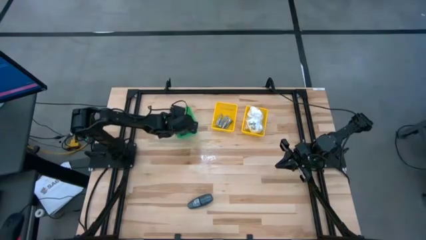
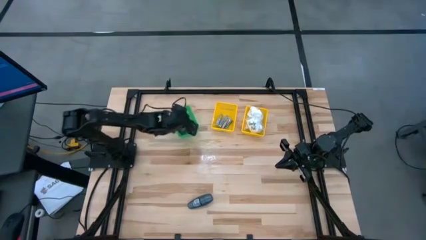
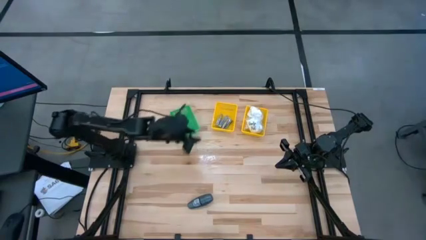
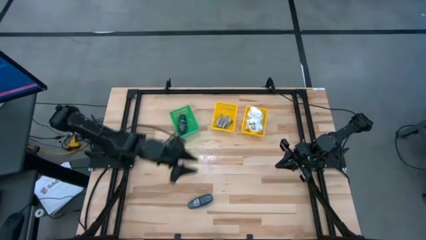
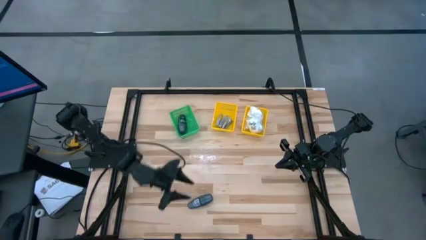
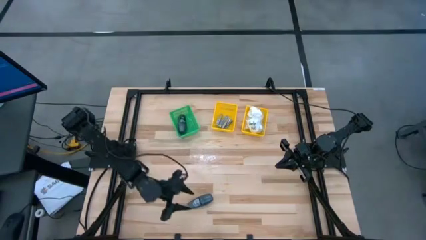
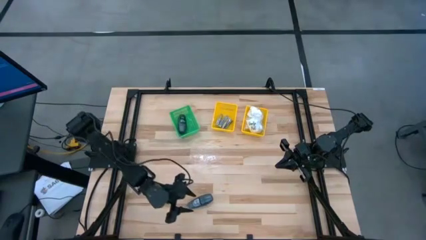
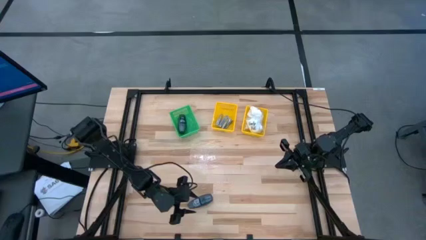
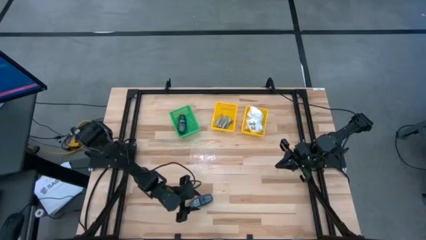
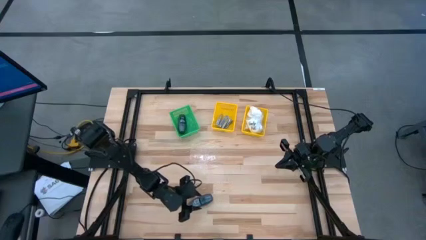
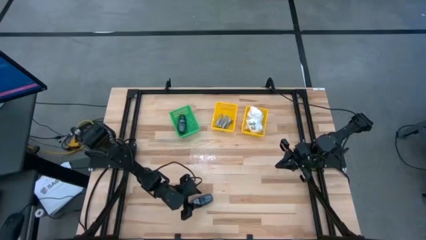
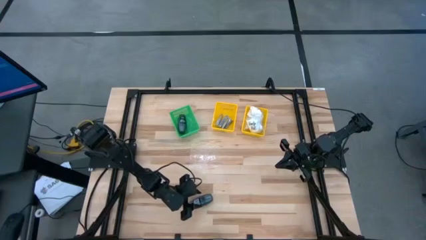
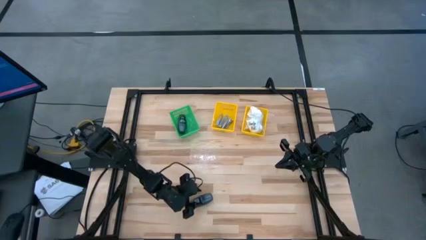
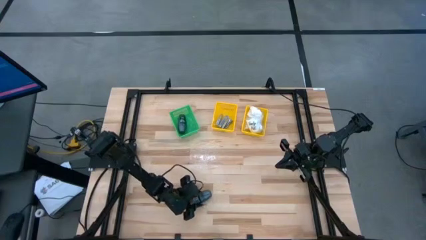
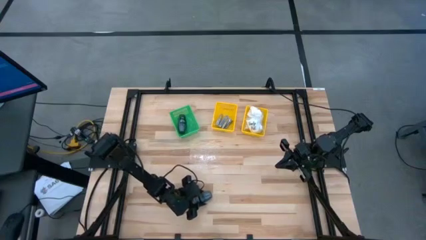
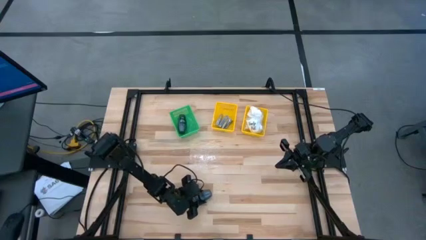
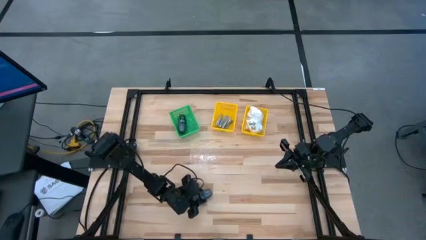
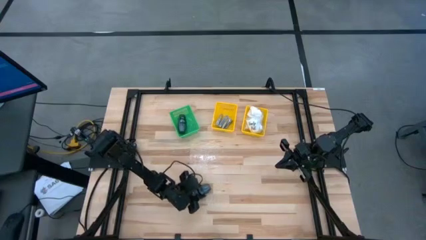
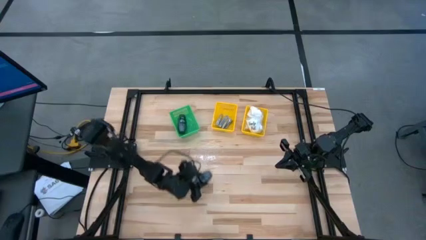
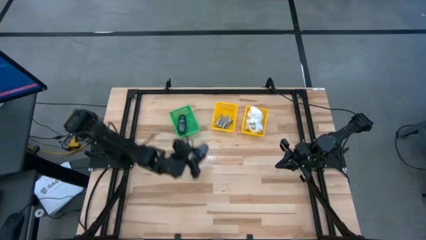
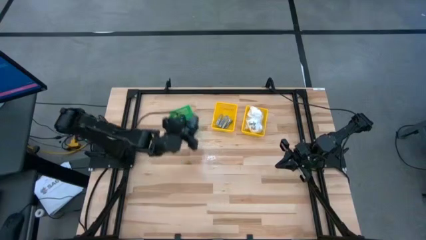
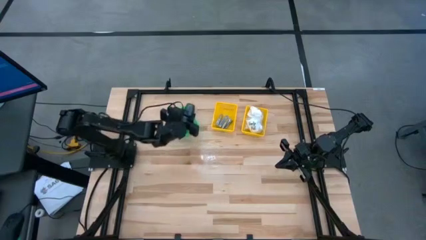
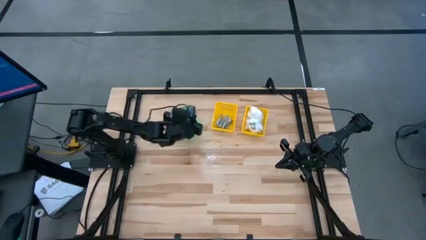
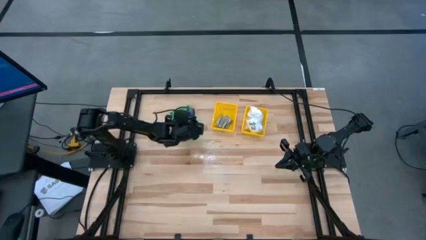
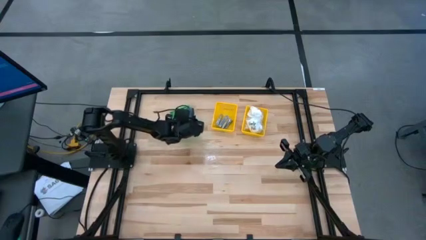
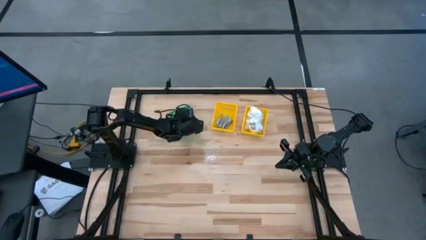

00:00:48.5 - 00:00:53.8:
Task: Pick & Place Travel size toiletries
Put the black deodorant into the green bin

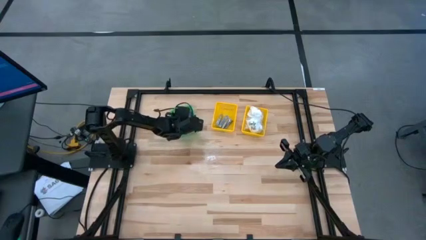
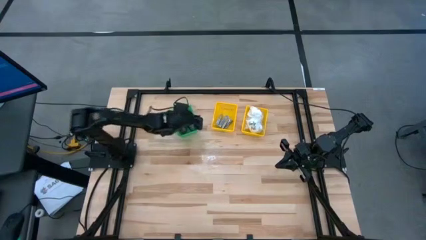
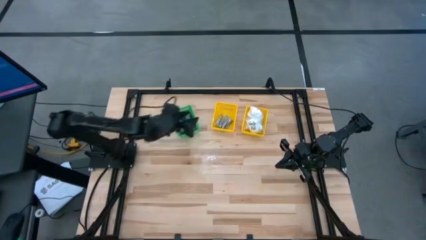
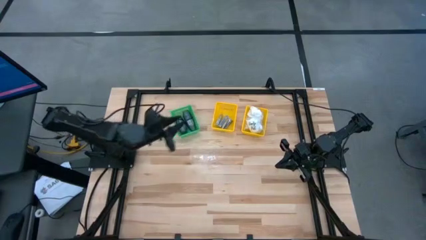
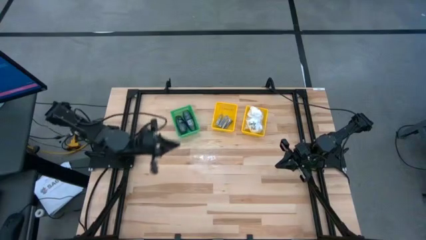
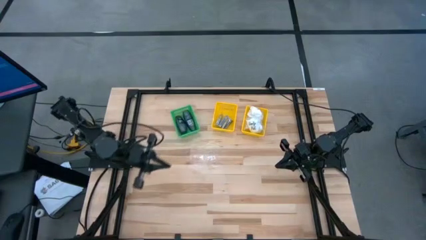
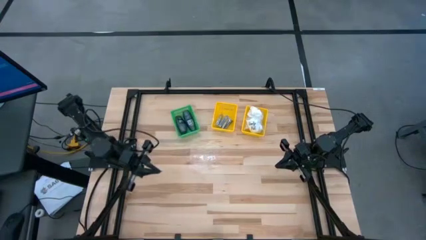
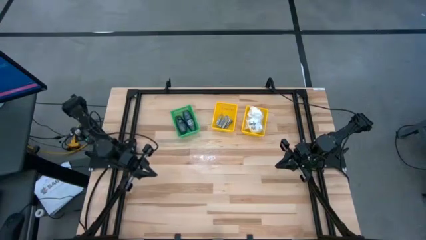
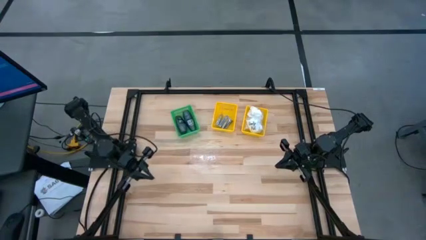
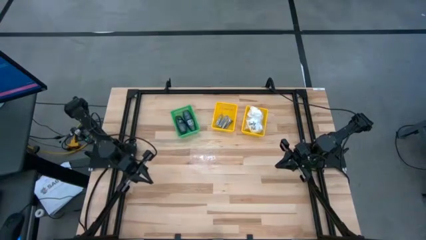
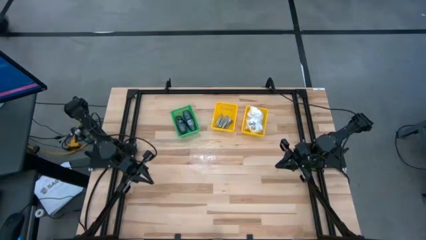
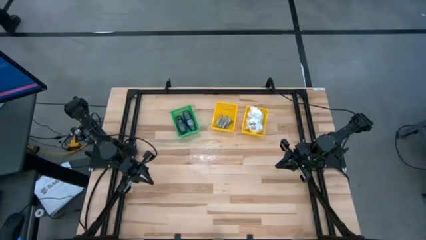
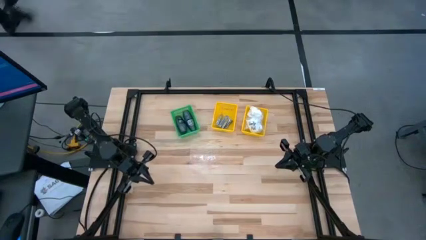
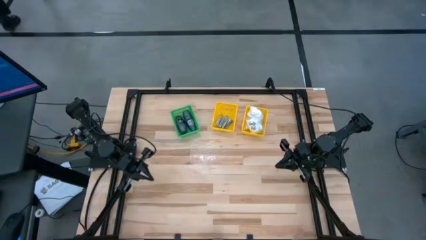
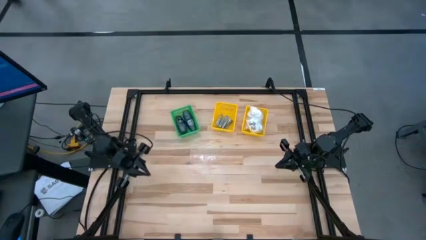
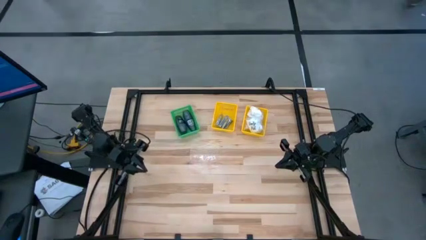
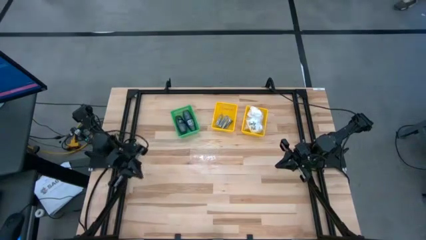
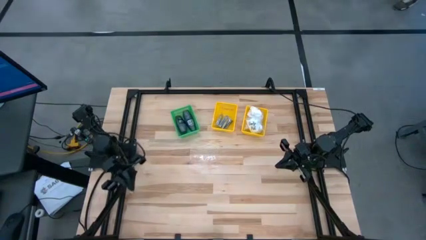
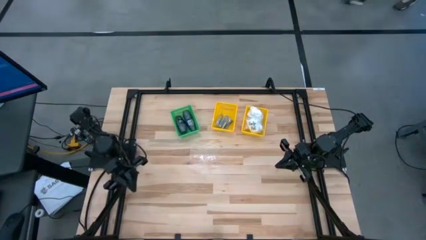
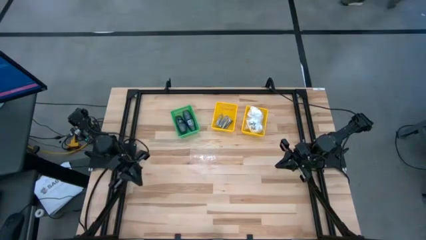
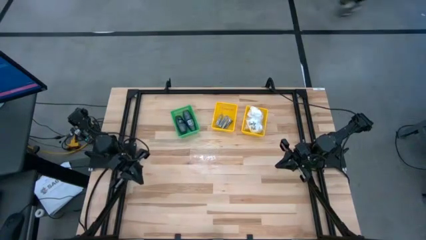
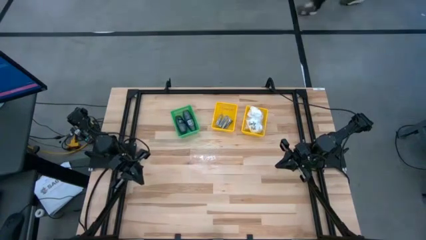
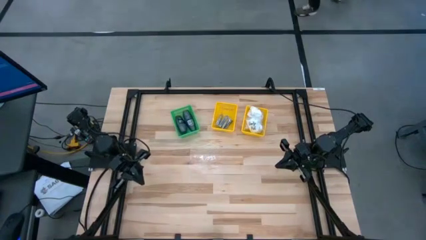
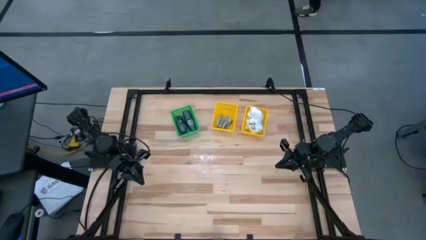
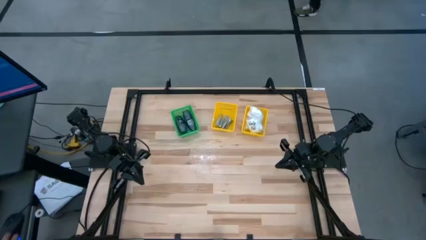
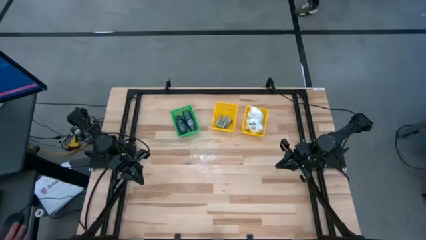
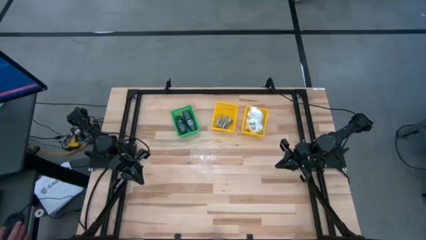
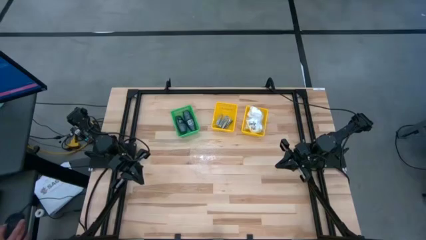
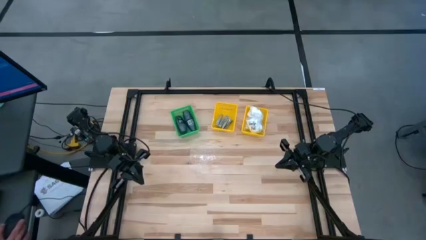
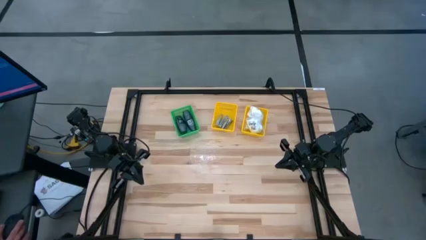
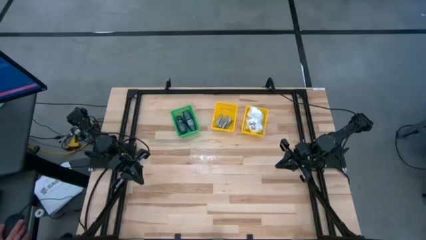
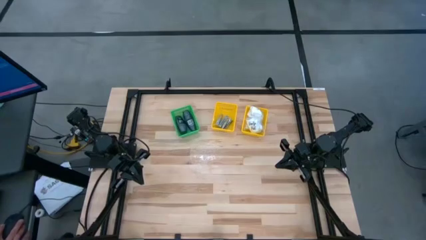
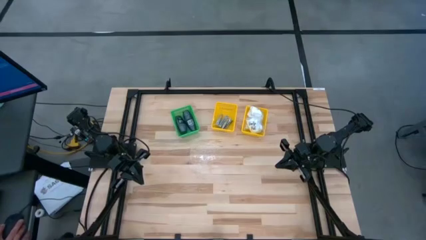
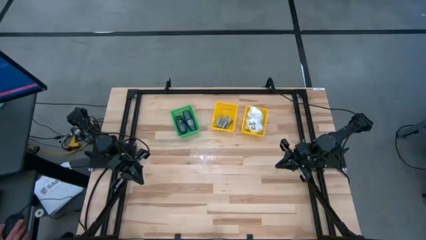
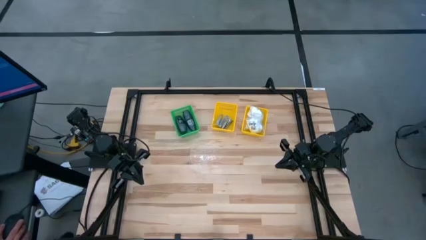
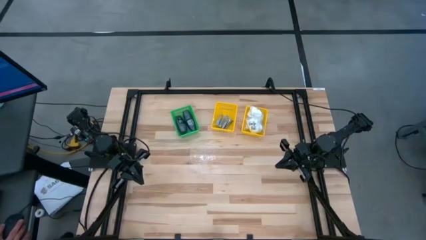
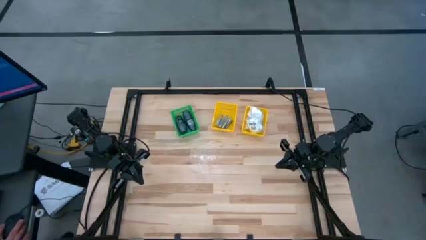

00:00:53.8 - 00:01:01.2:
Return to Home Position

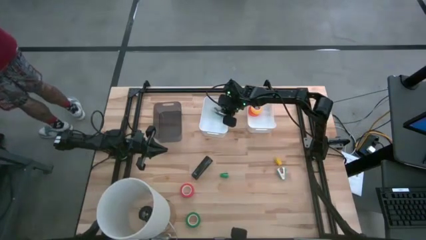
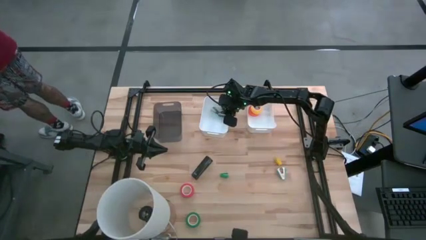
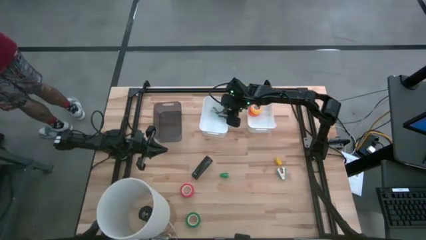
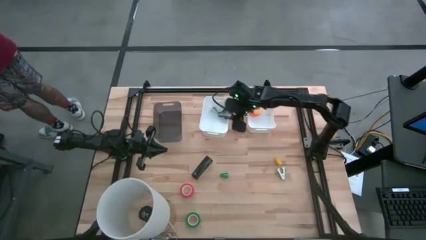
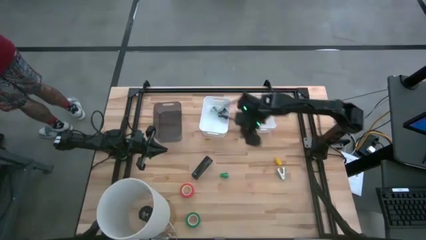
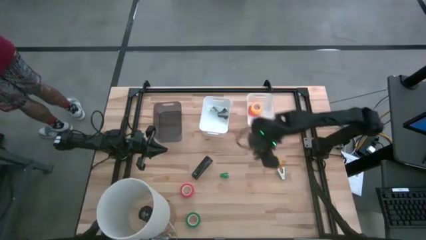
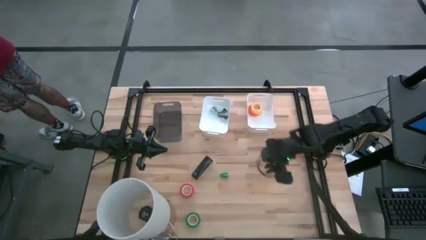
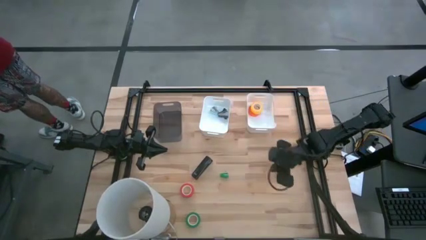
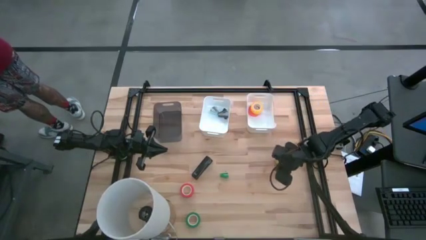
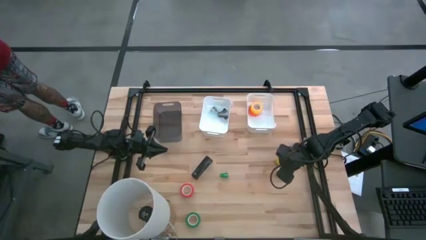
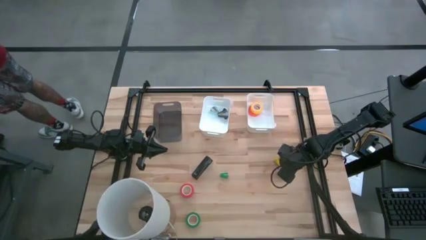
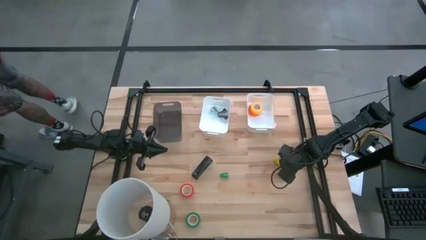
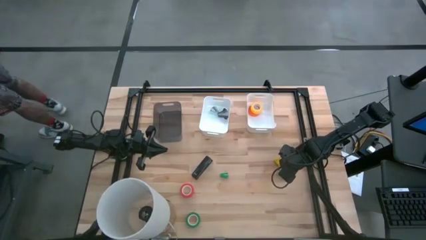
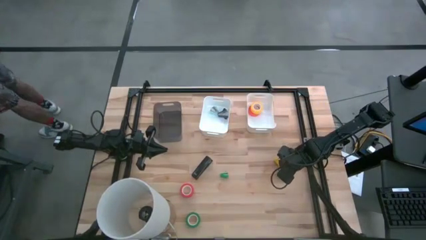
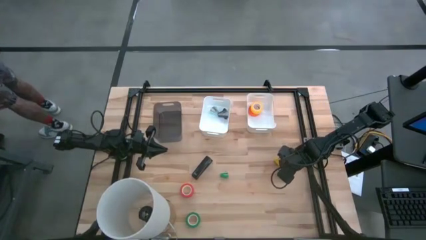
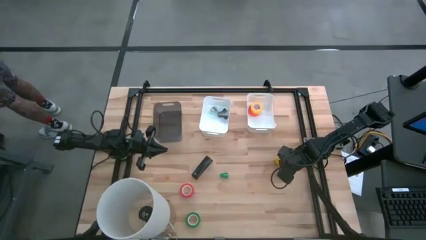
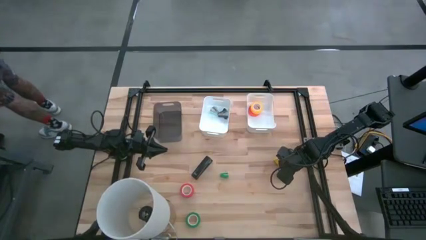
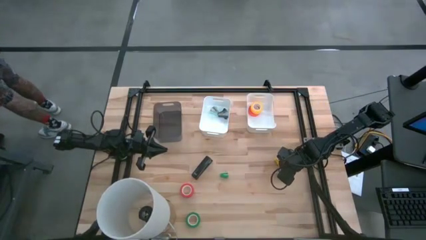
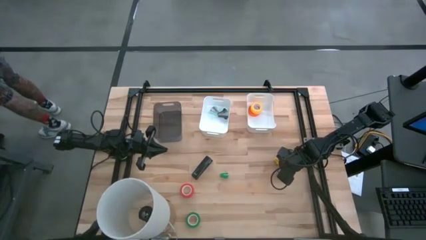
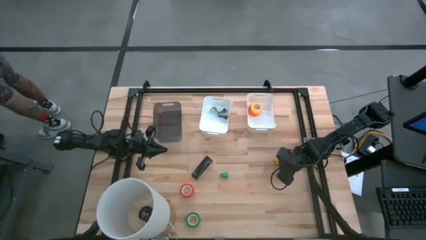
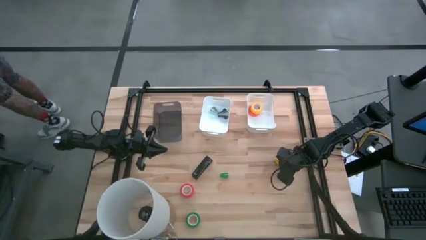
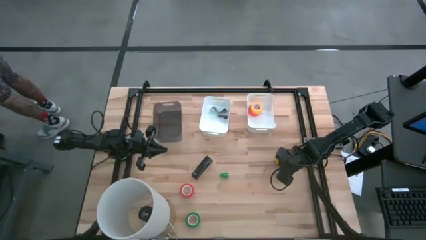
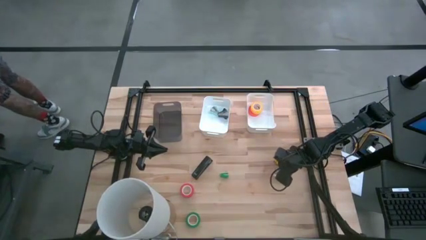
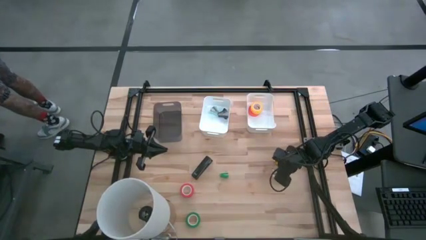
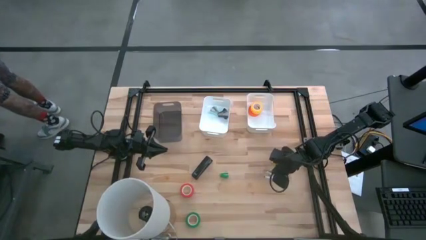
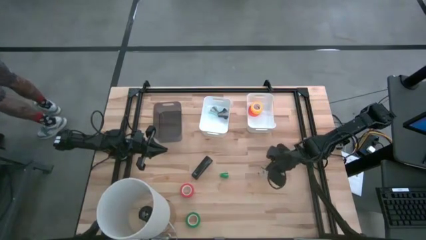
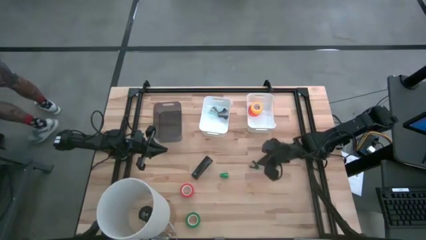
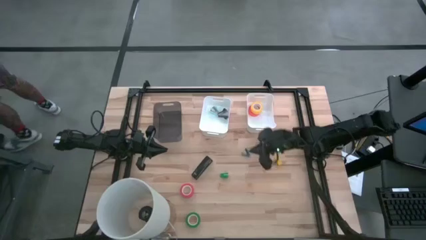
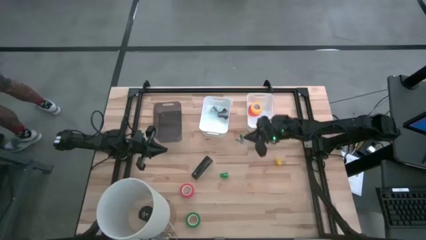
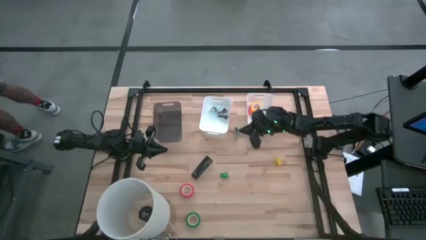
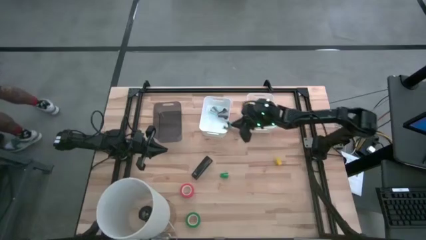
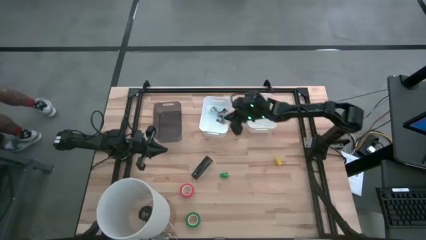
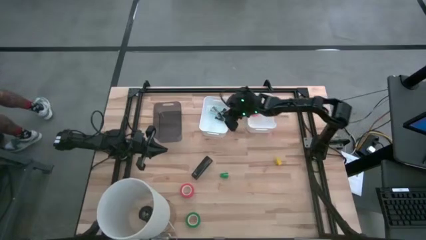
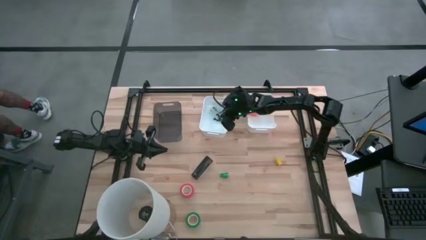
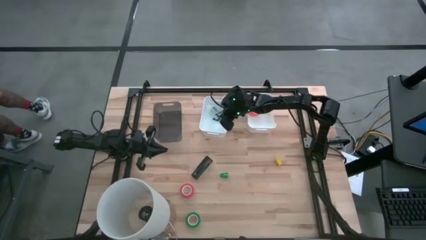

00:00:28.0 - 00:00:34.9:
Task: Pick and place Stapler, Stapler remover, tape
Put the light blue stapler remover into the left white bin
